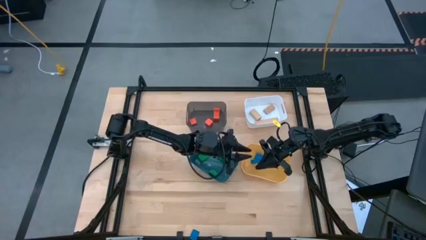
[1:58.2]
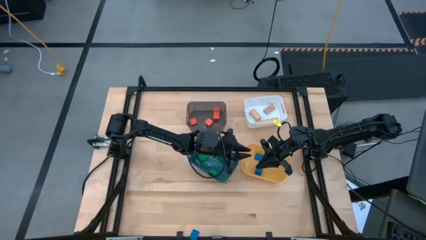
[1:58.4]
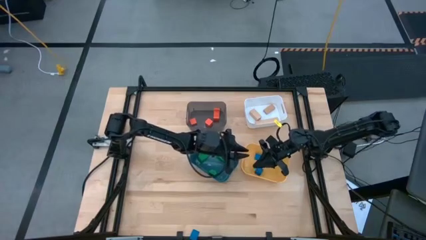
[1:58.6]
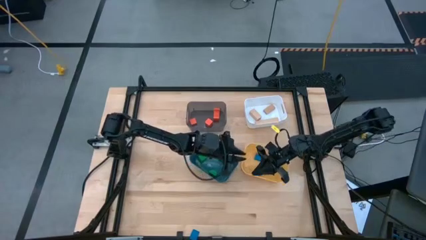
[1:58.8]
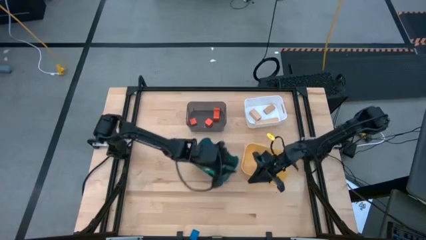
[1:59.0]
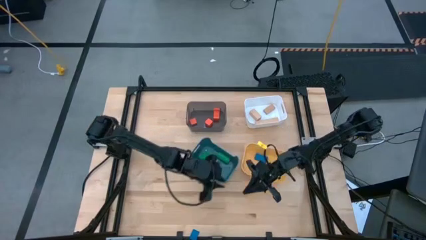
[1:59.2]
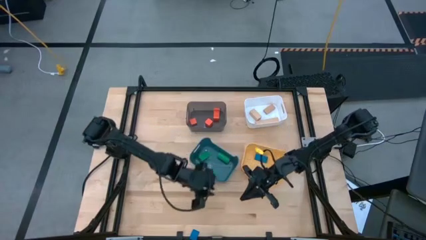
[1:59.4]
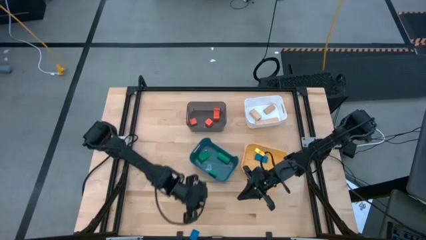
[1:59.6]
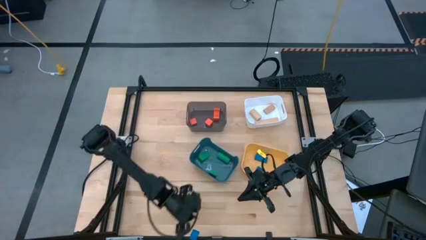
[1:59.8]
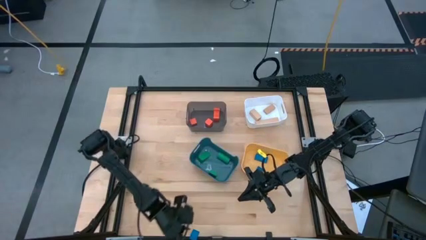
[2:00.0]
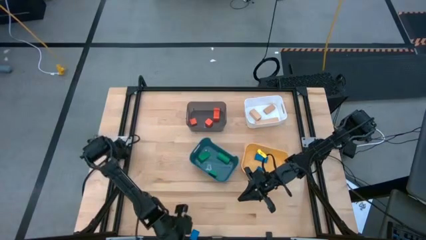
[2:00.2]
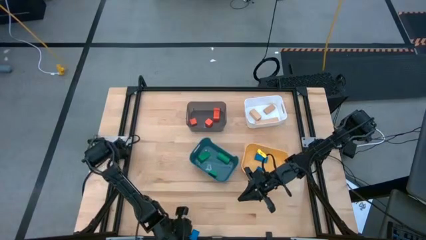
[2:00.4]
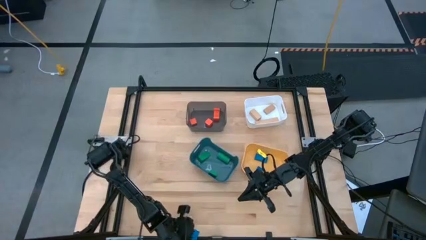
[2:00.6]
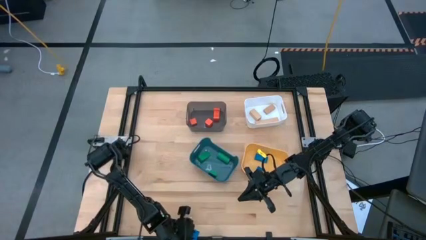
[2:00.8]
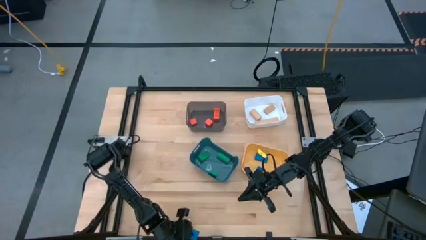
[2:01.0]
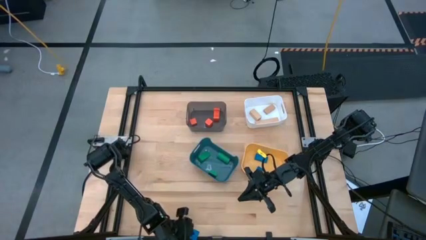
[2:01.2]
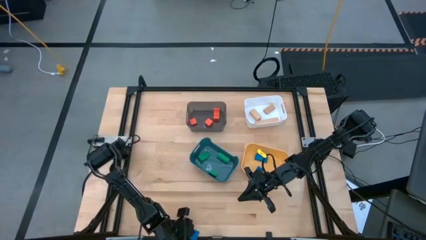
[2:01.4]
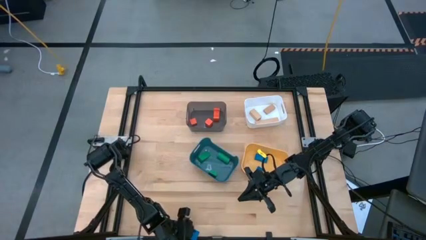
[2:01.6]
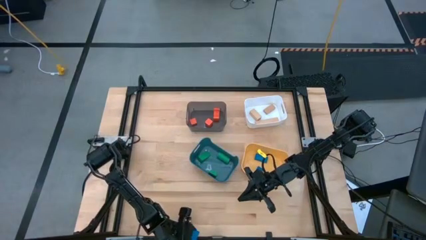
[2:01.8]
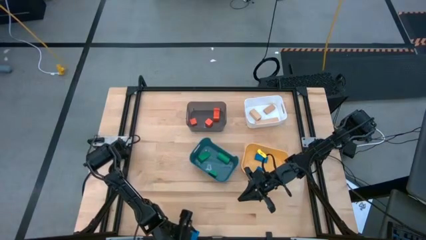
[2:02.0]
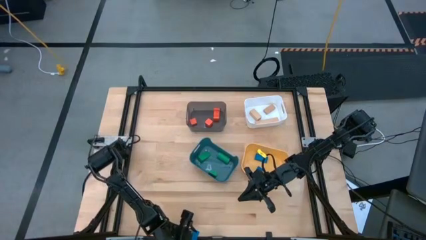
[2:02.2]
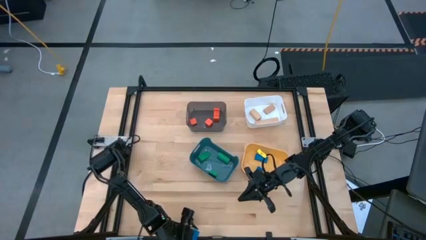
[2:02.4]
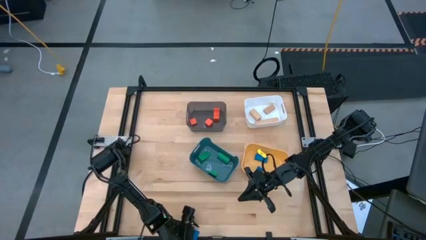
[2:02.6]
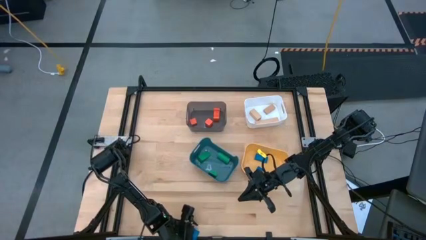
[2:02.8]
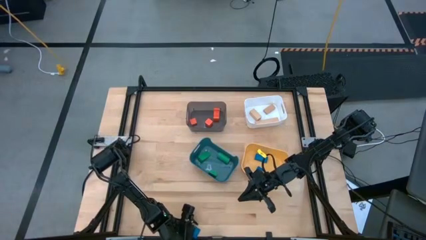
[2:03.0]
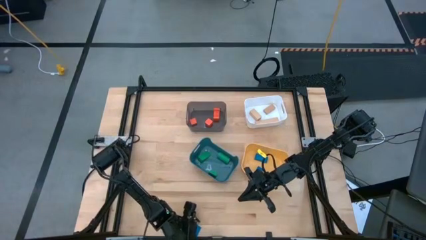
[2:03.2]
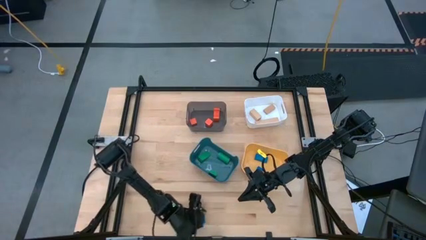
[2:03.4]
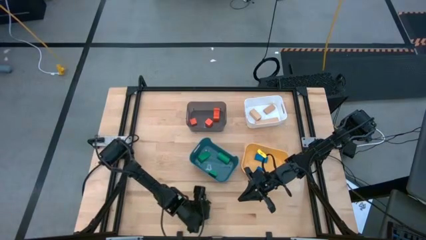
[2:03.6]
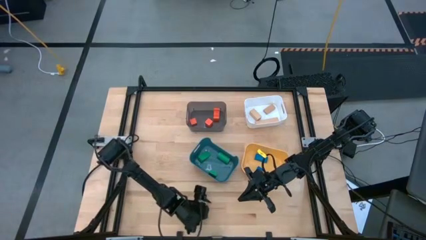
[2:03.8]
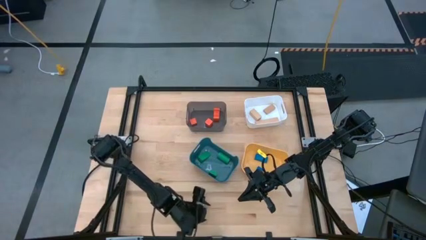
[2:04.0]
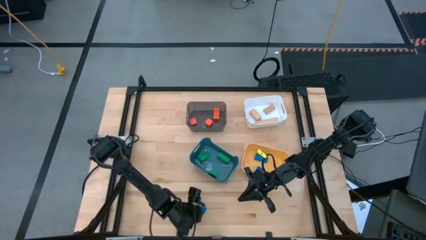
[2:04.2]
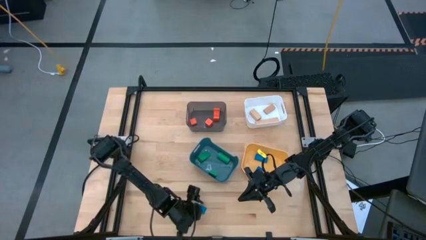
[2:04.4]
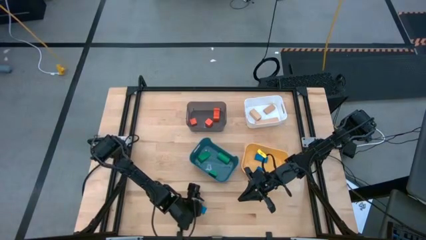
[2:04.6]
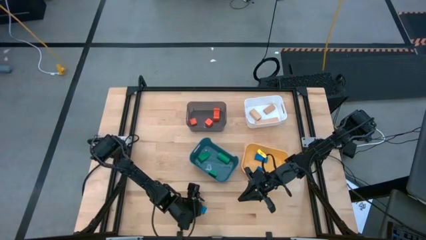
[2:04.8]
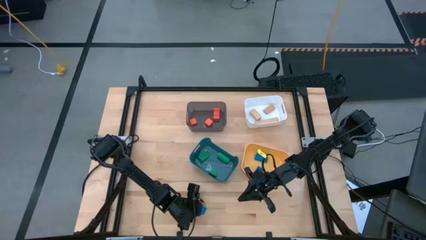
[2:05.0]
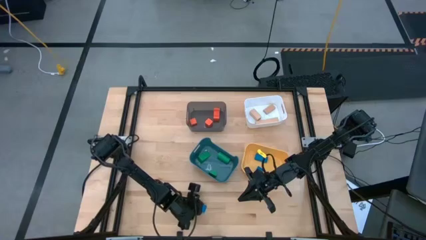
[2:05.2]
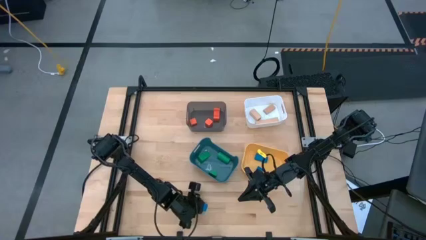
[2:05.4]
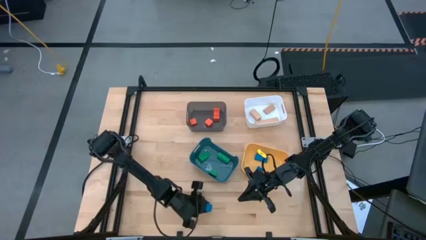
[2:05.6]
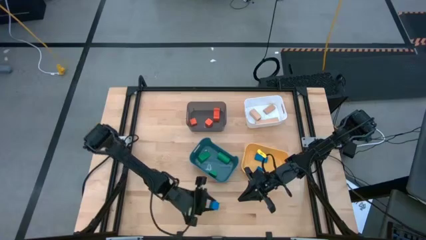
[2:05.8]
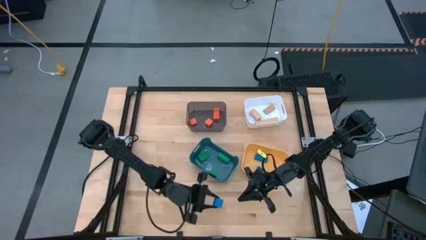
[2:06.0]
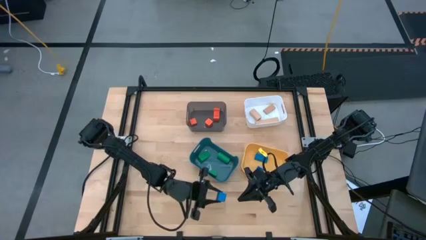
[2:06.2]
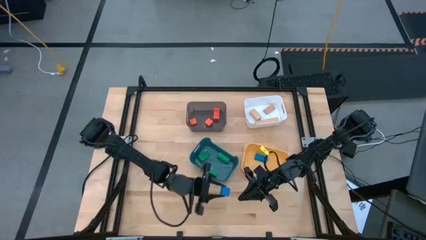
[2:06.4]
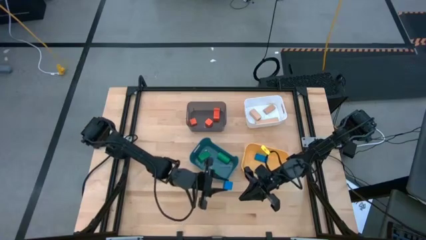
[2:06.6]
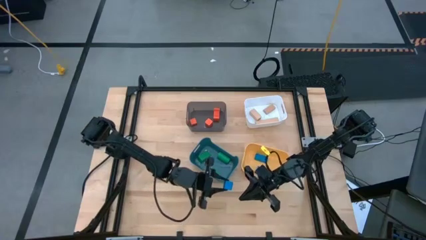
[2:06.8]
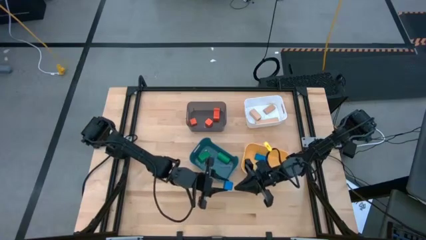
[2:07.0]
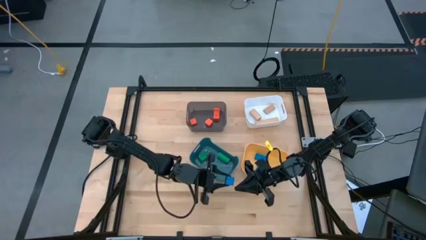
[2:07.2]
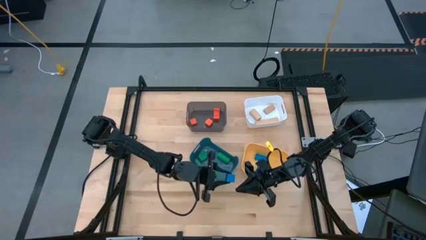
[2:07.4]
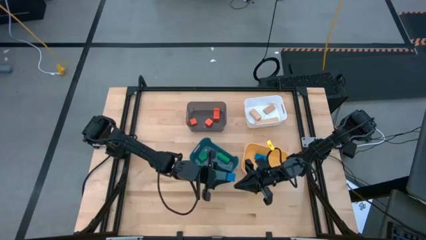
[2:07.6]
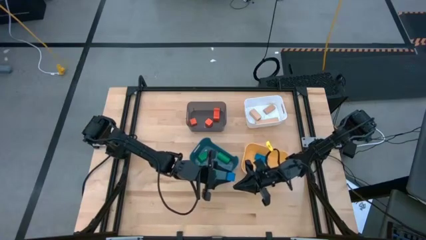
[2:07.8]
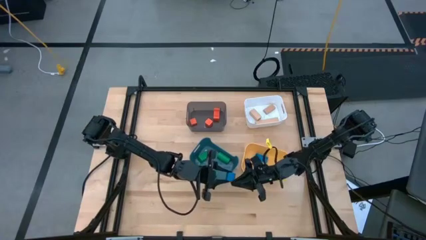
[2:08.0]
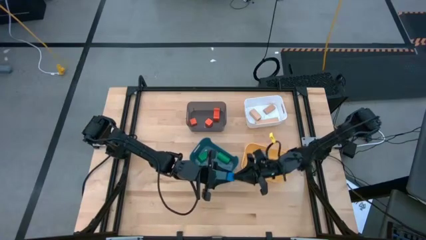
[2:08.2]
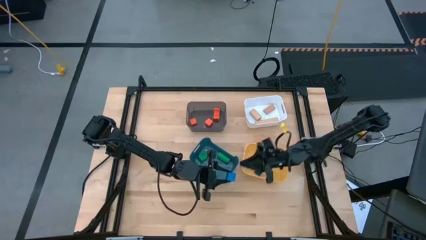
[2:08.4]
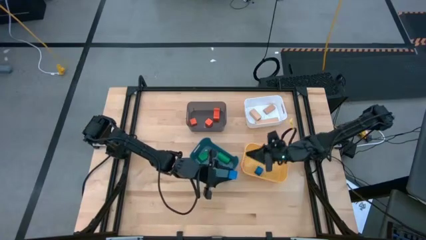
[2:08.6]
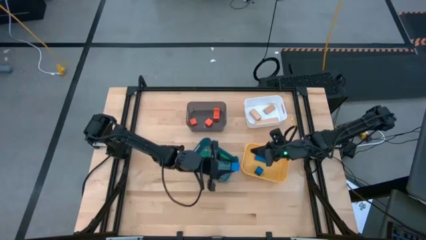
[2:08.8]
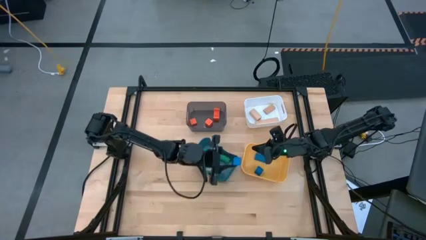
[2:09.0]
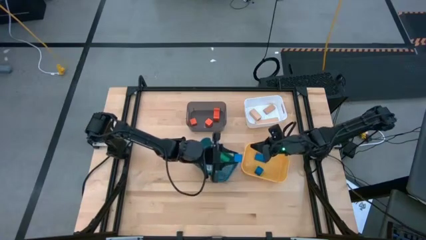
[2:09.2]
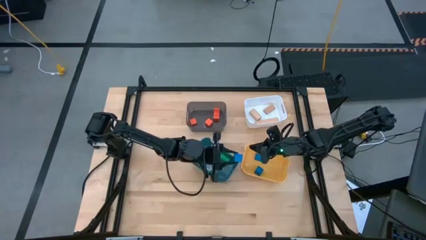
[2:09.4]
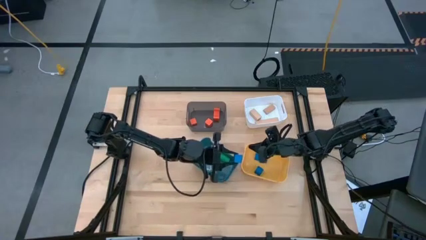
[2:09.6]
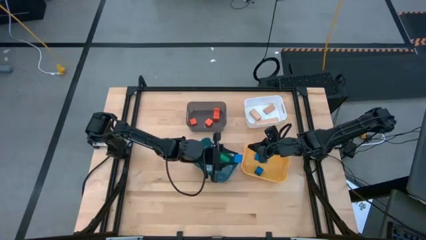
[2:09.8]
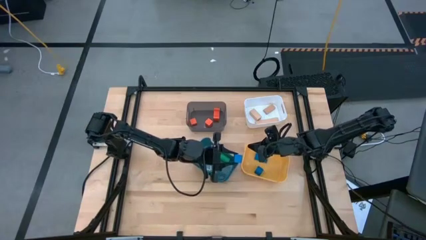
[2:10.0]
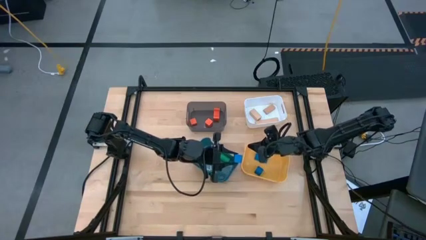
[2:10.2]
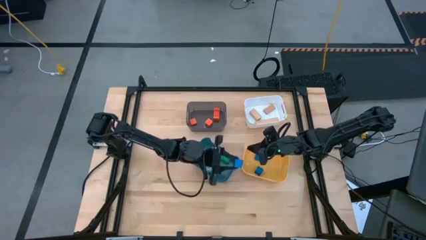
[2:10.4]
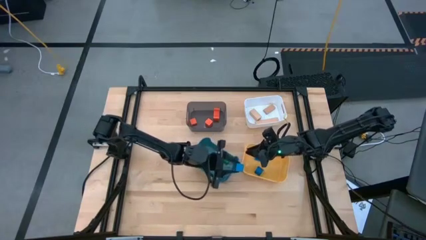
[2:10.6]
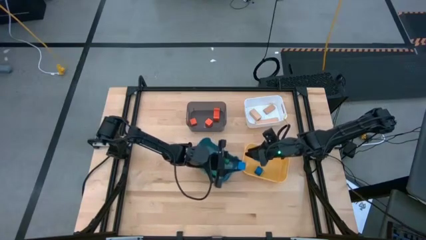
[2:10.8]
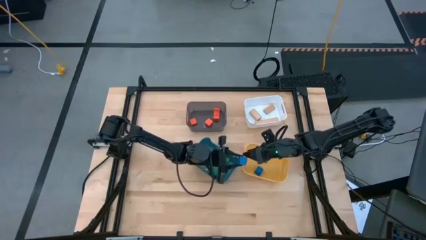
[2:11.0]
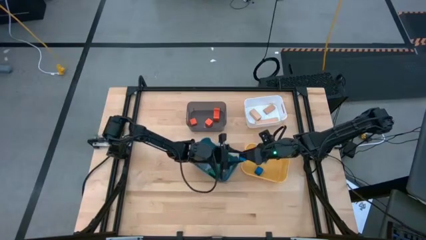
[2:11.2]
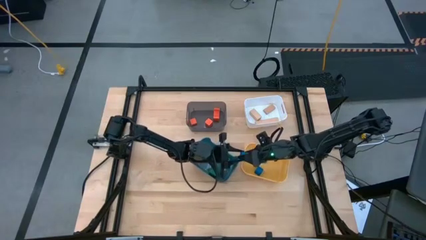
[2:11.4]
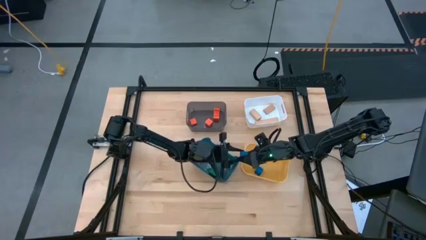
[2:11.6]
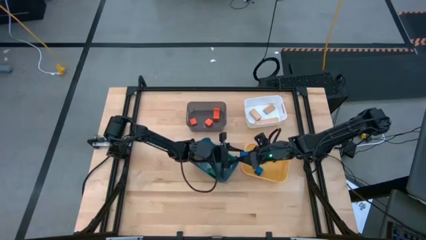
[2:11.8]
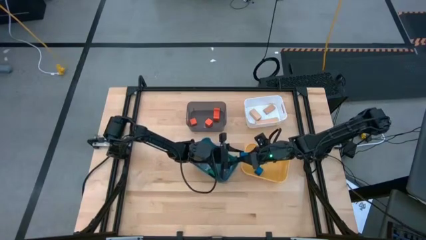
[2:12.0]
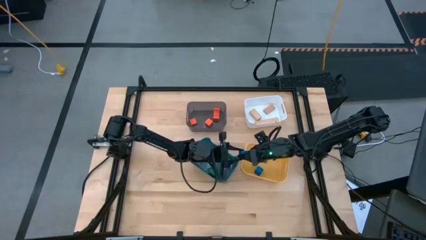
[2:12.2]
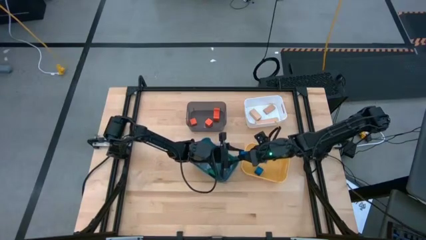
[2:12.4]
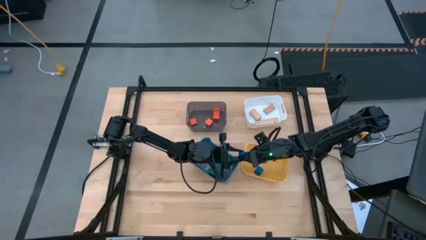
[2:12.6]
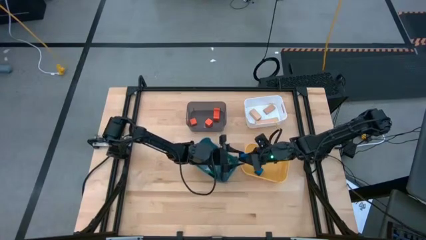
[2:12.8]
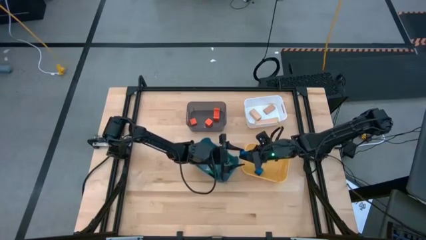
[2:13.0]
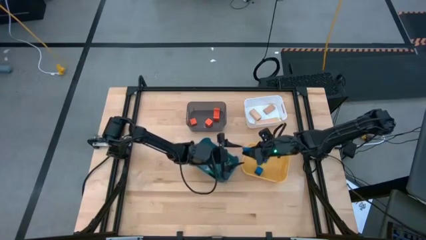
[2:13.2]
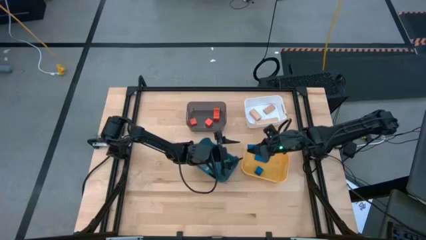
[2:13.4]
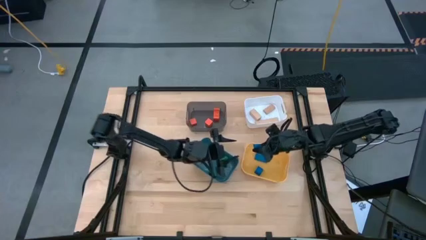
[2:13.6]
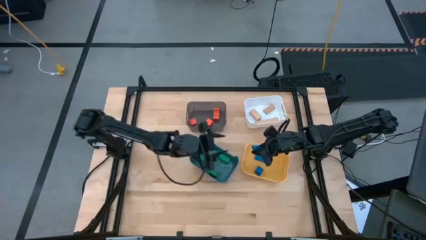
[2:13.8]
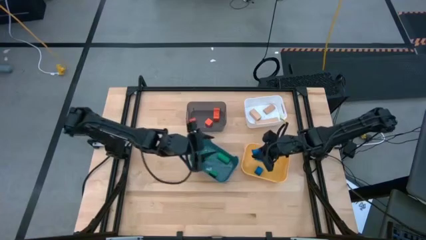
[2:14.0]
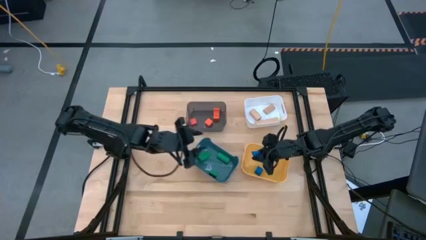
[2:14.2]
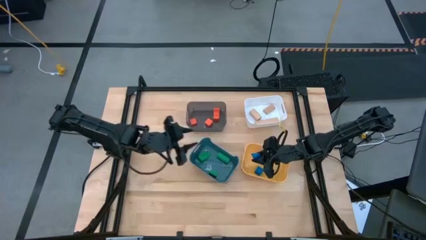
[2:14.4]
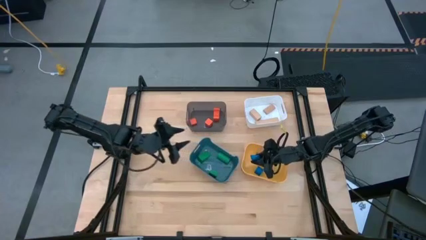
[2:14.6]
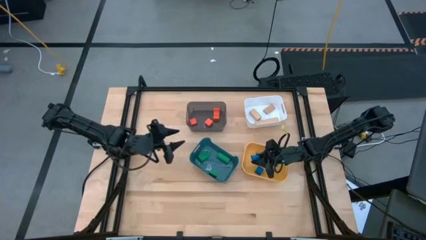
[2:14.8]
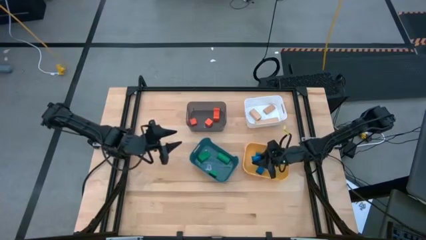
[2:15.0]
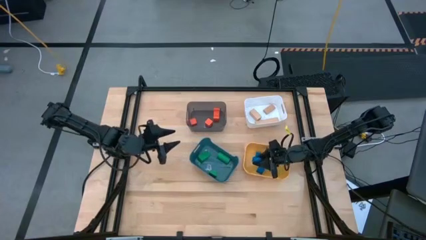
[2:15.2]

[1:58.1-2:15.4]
Task: Sort & place blocks by color
Put the blue block into the yellow bin
